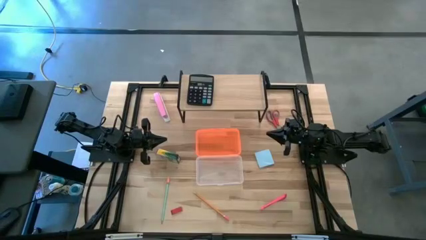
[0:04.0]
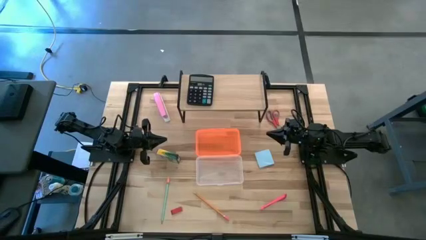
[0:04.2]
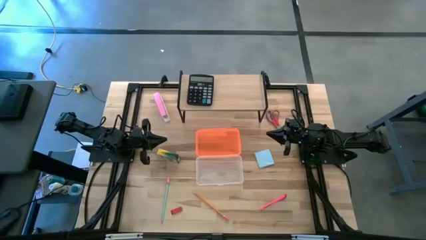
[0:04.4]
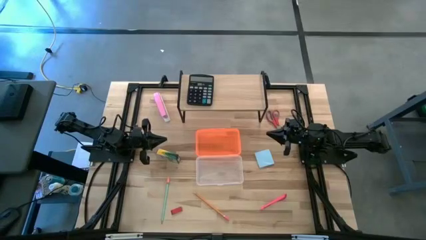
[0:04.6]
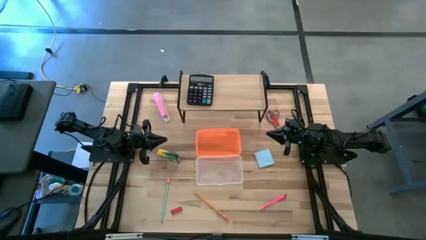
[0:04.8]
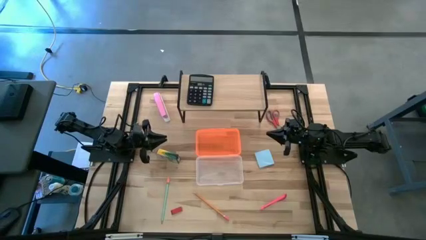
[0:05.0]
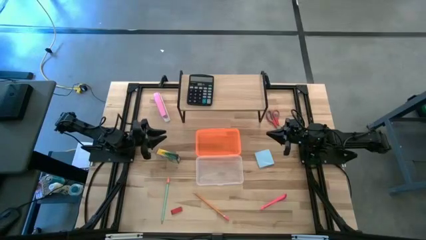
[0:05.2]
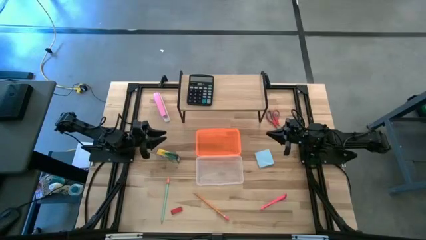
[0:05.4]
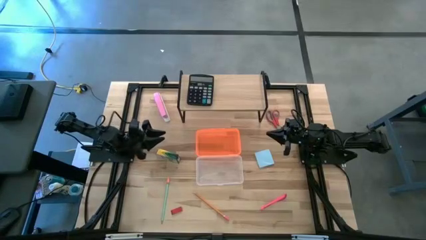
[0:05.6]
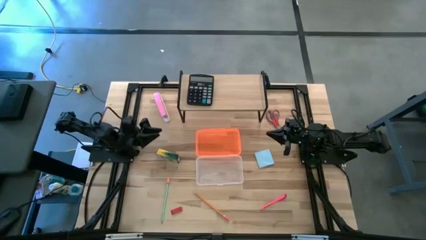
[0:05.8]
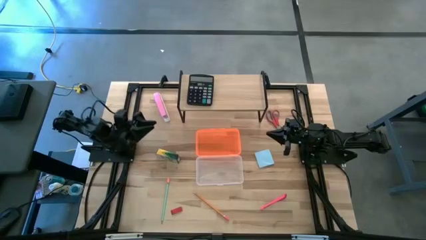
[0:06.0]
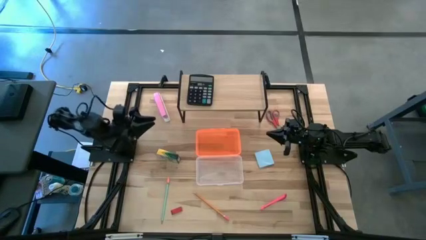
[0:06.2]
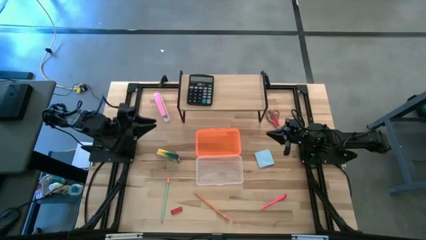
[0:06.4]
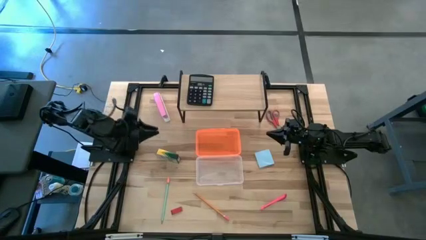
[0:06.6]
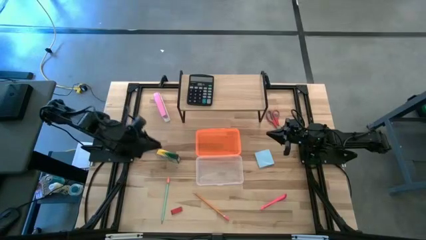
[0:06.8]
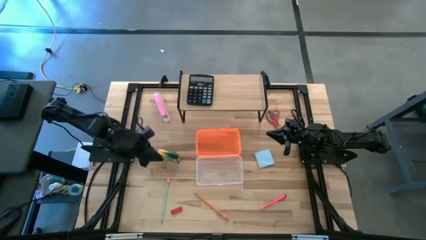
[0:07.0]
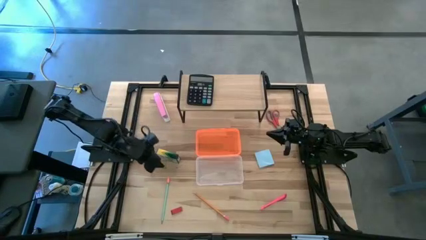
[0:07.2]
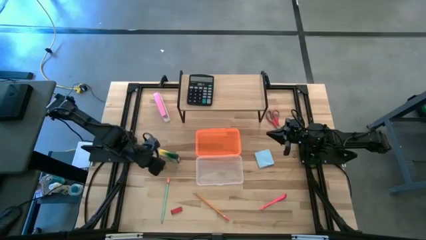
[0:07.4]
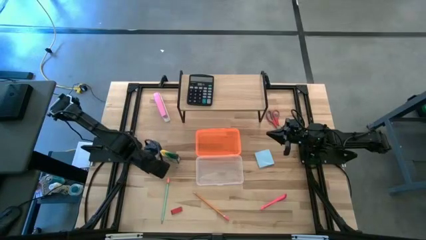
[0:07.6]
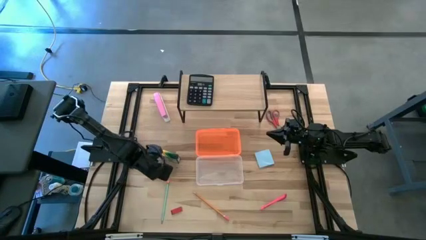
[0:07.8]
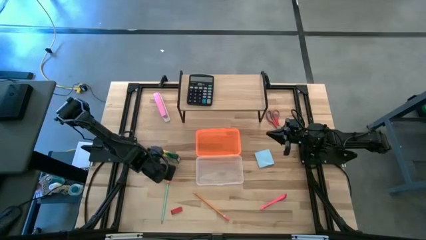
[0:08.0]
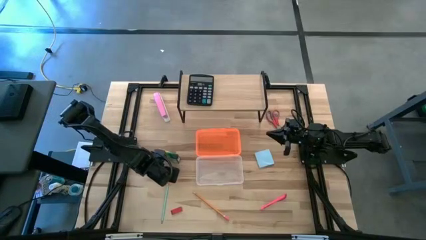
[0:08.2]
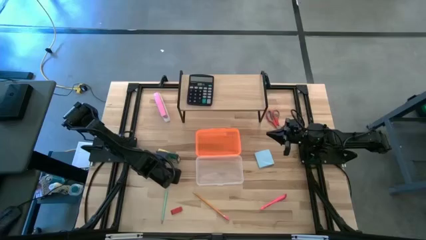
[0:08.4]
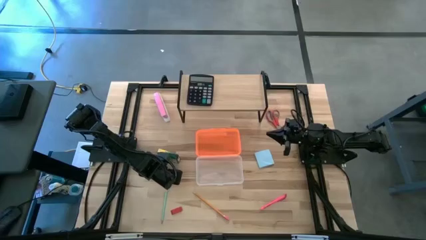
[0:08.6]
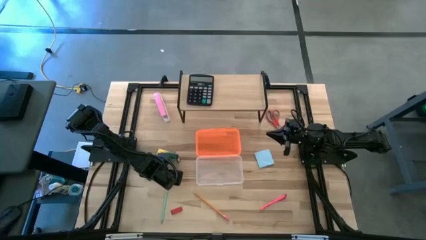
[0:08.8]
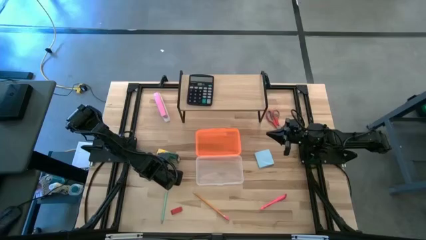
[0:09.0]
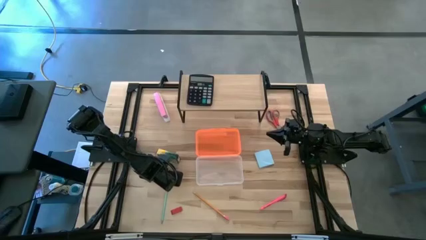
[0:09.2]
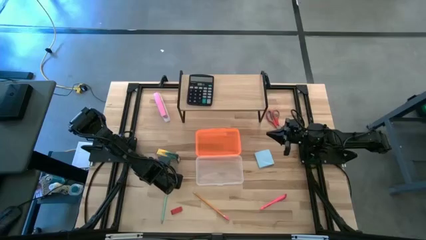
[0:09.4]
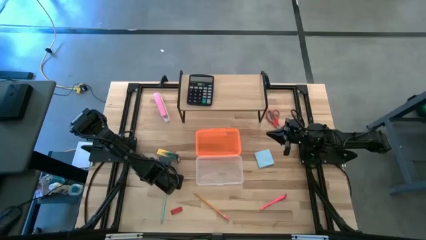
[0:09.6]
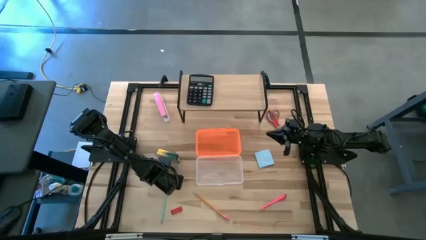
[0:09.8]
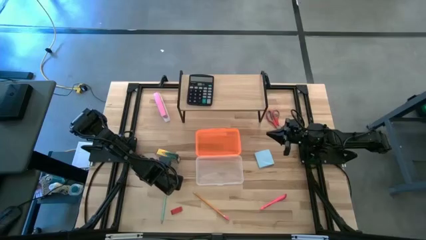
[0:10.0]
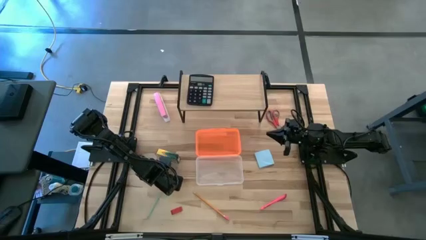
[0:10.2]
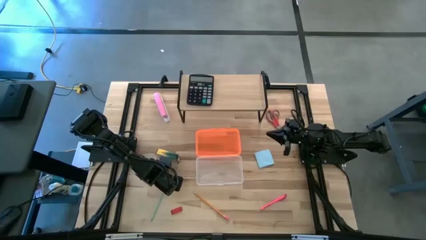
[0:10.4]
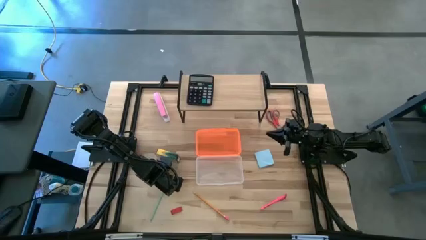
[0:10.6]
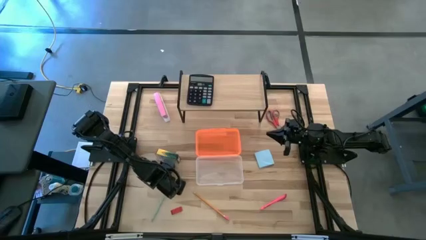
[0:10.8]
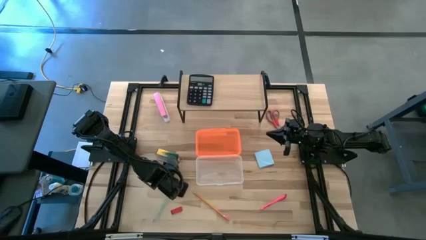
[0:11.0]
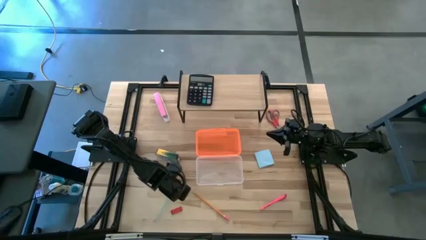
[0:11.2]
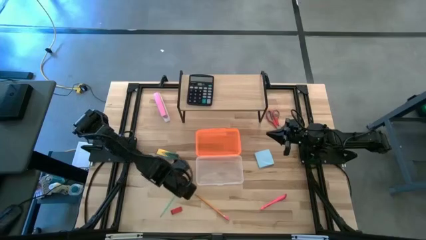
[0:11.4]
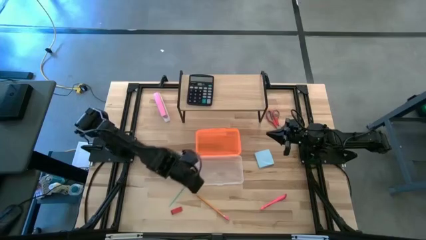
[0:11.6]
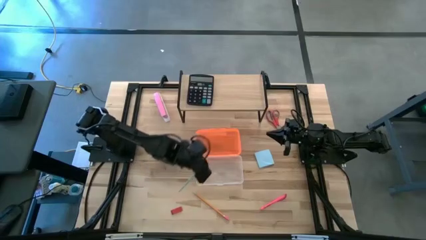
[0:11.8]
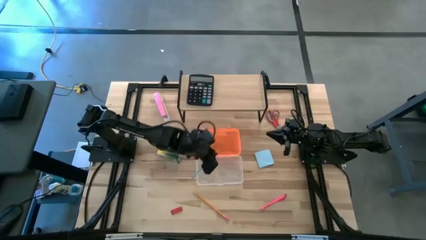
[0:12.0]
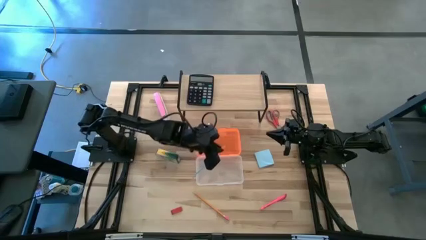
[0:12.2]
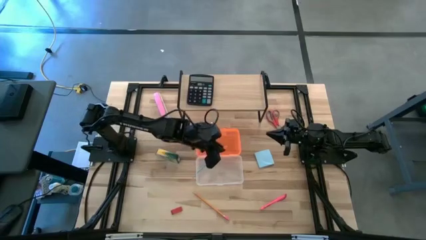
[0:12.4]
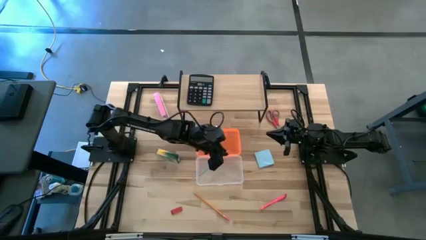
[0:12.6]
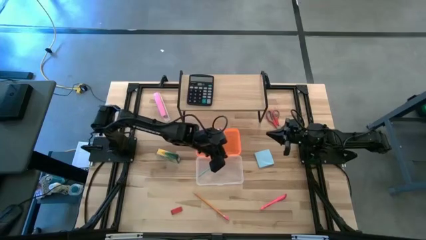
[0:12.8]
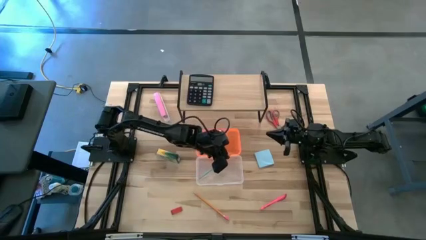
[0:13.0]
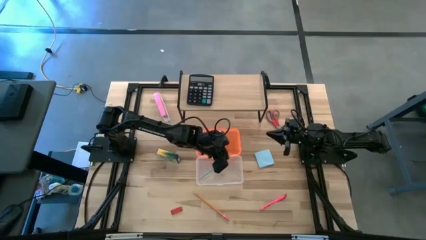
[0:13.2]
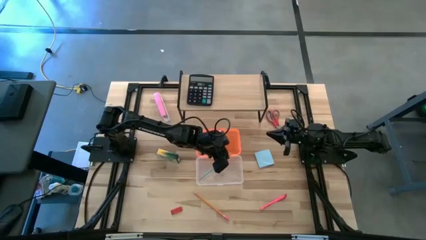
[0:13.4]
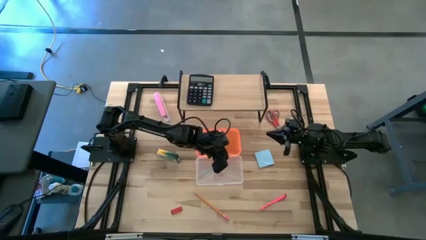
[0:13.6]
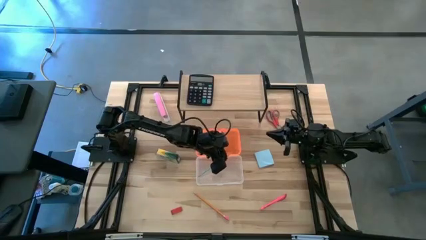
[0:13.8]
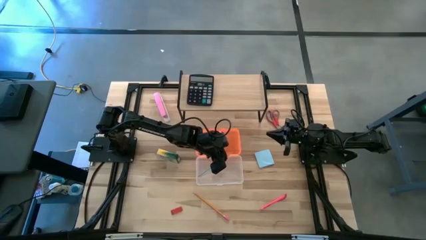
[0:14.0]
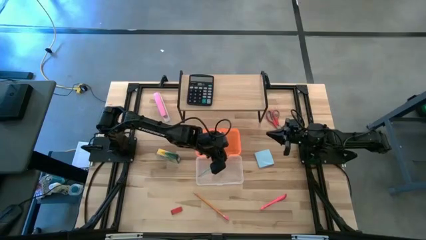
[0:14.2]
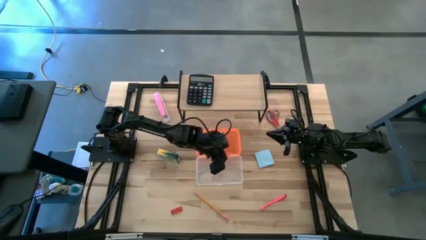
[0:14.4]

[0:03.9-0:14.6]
Task: Pack school essentials
Put the blue pencil into the orange supply box
